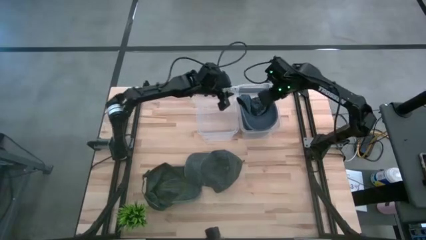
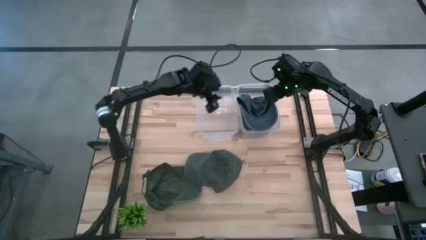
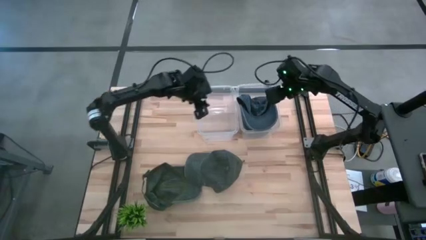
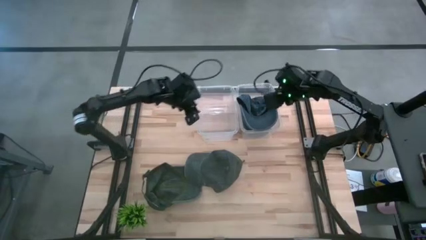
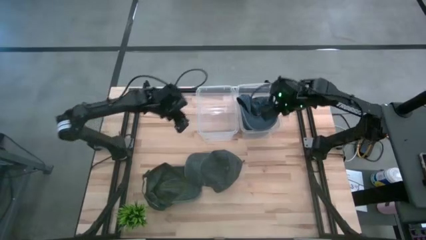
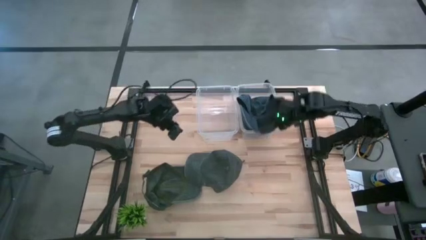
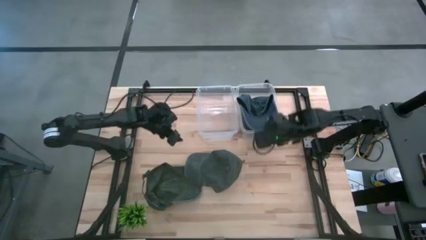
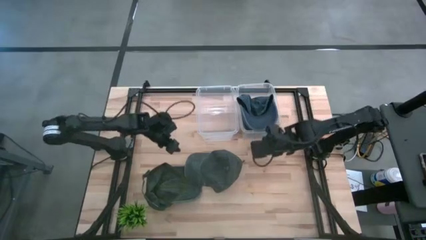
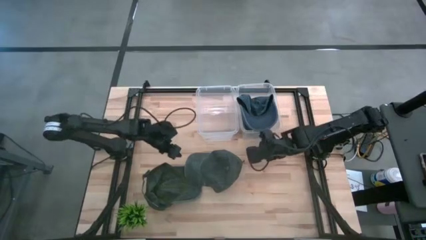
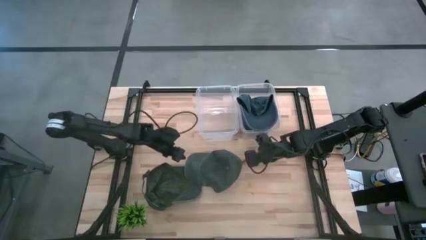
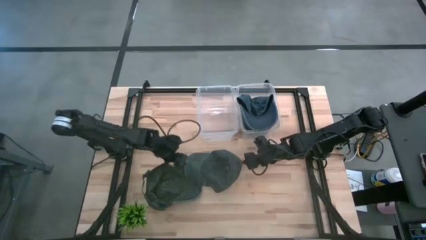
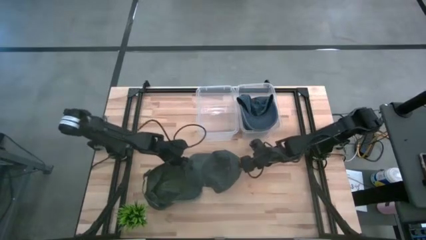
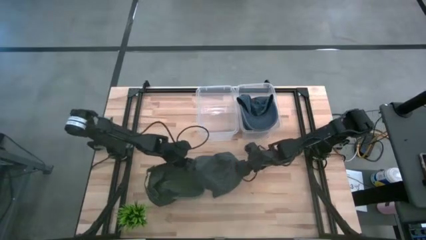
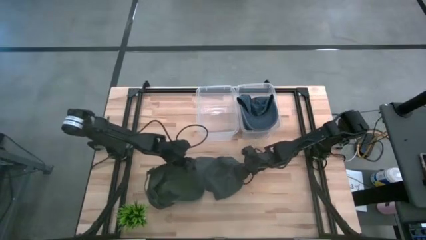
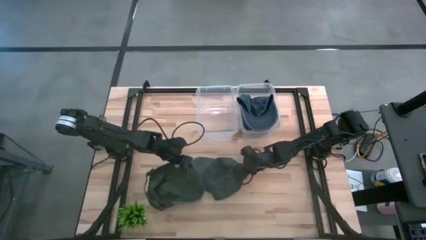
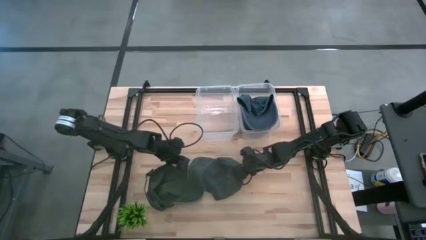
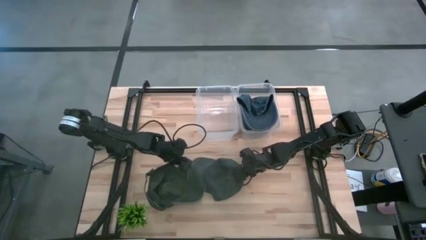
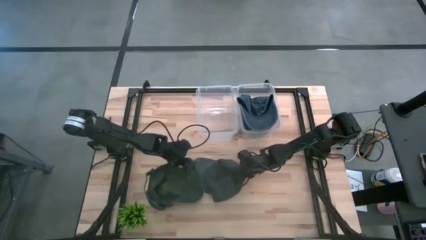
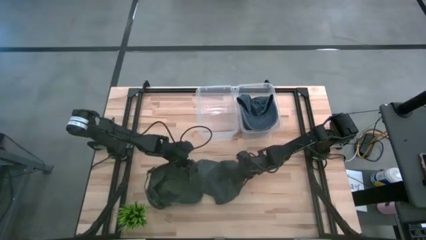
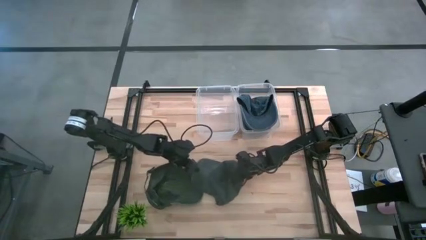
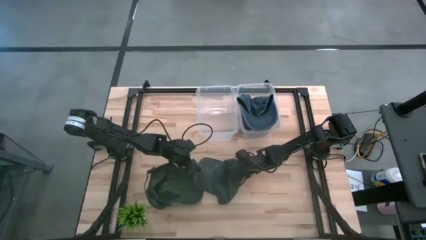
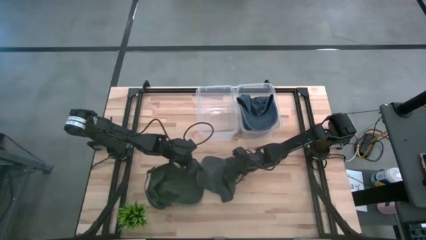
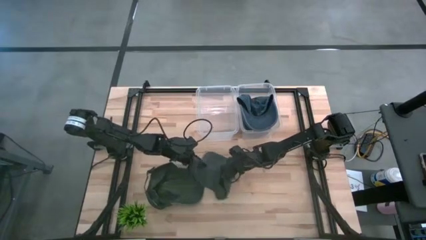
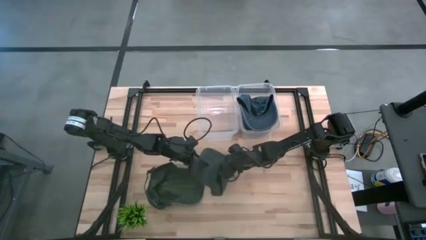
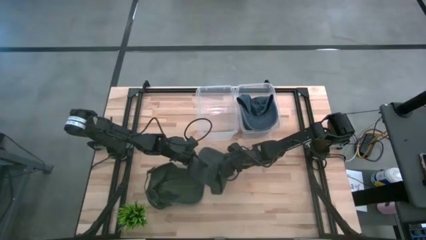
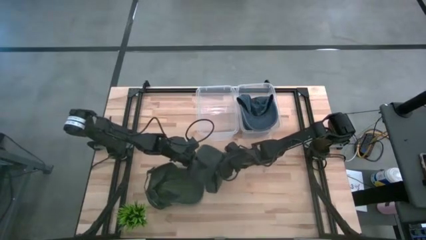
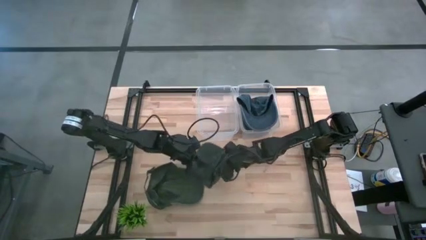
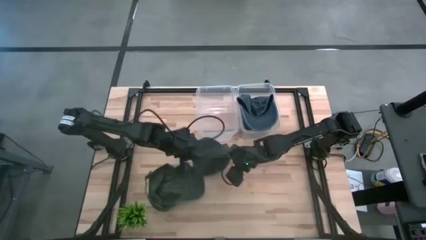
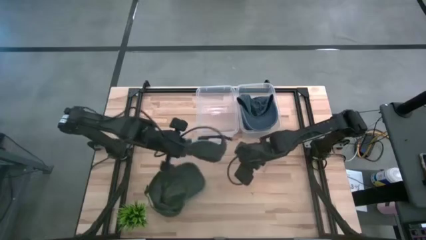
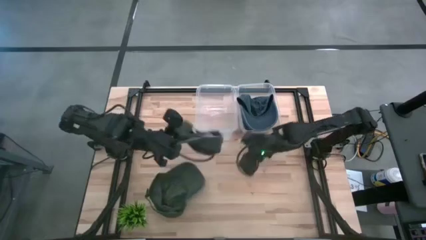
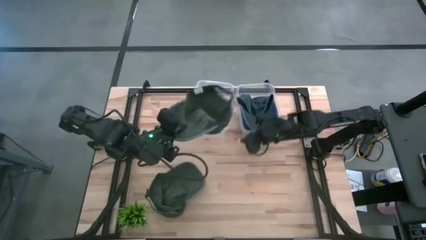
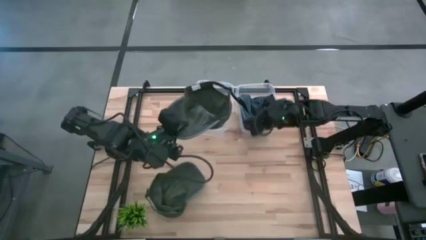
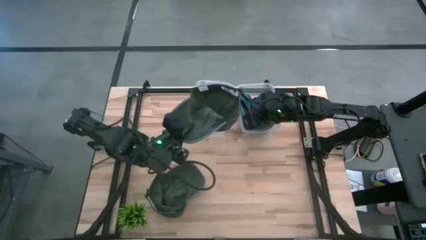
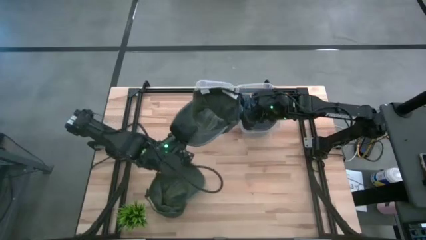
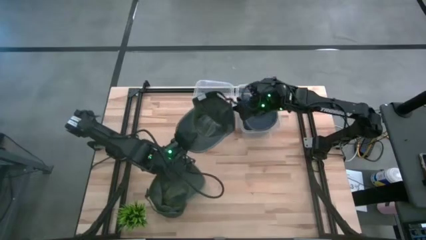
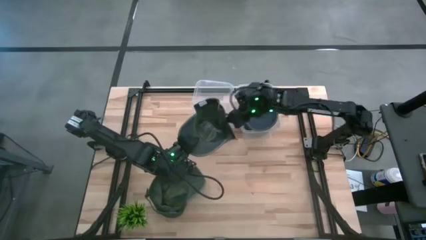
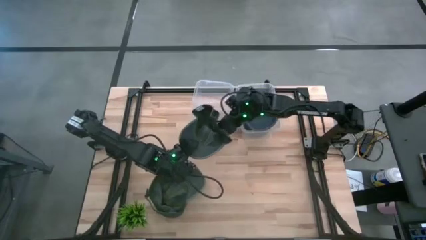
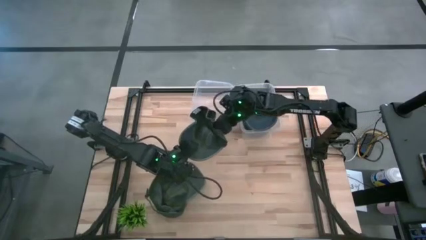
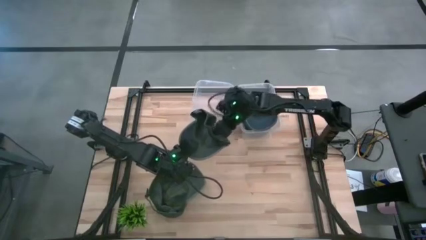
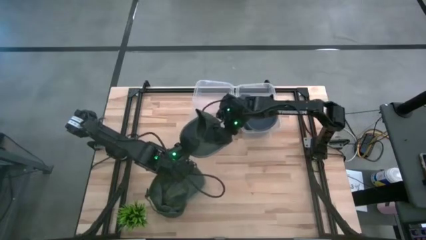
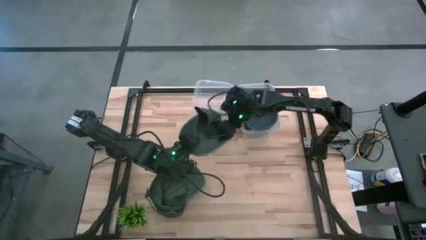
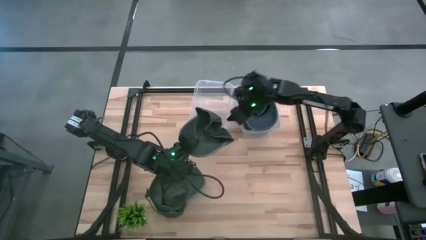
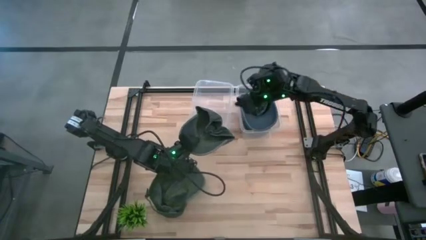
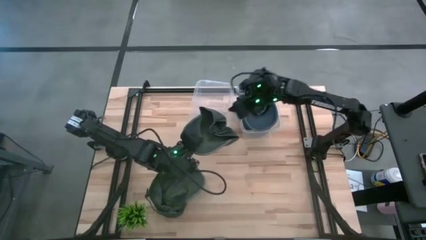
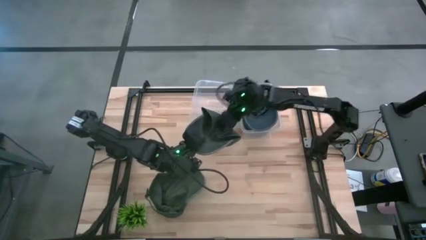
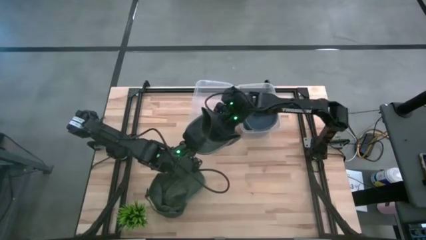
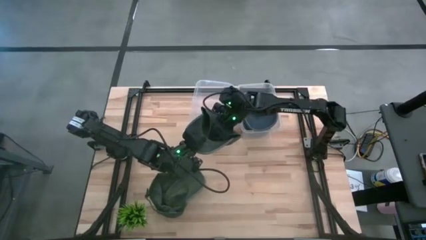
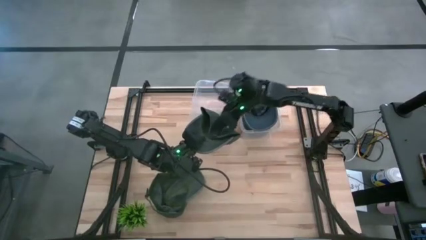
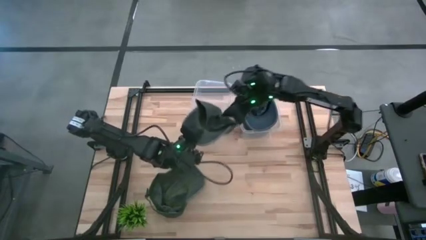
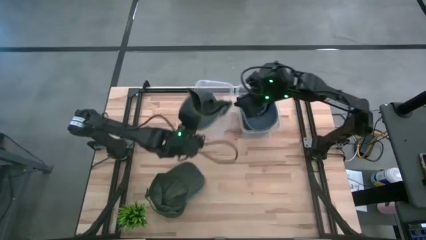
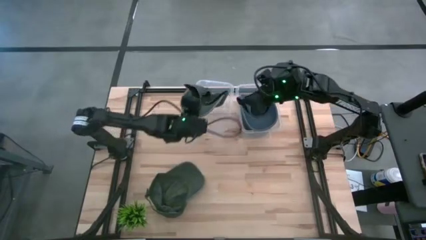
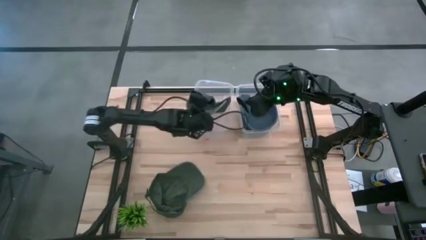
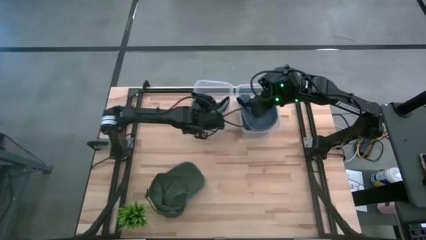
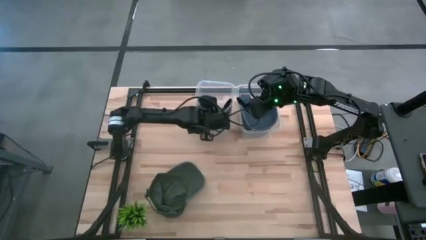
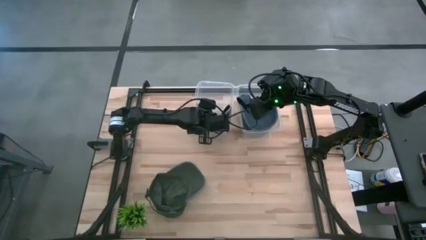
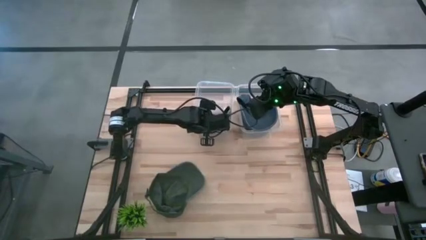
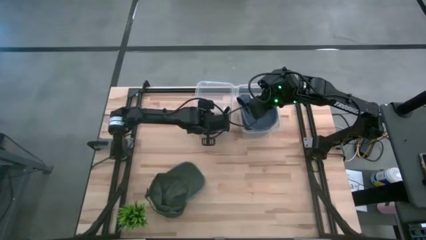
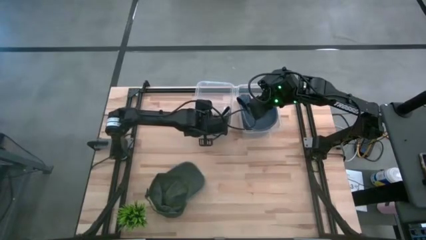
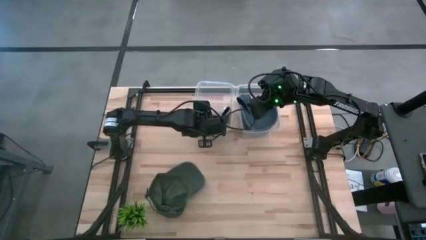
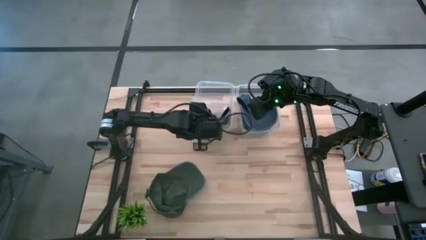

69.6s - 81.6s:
Task: Pick & Place hat
Put the right gray cap into the left transparent bin

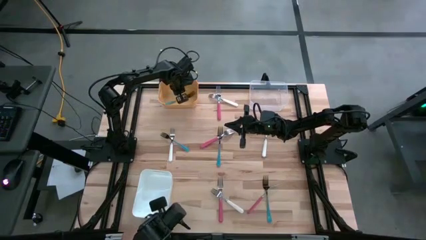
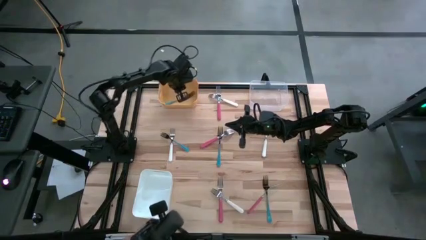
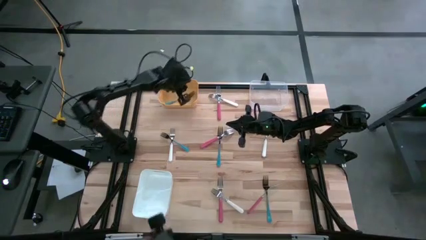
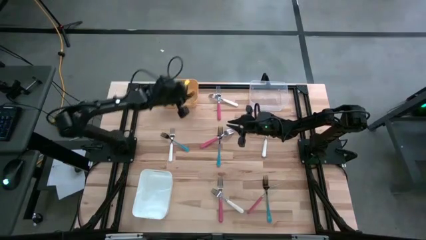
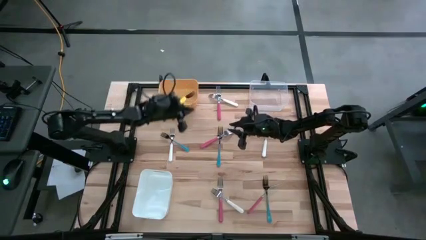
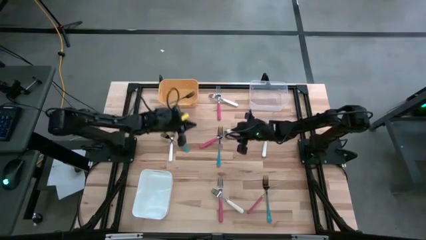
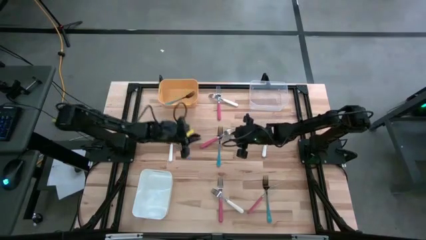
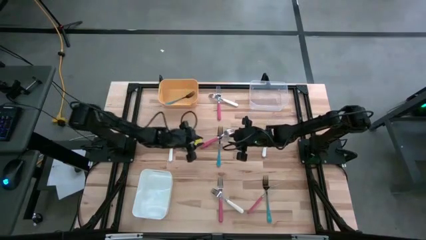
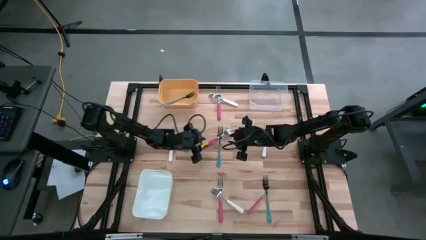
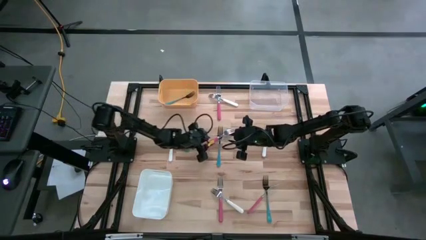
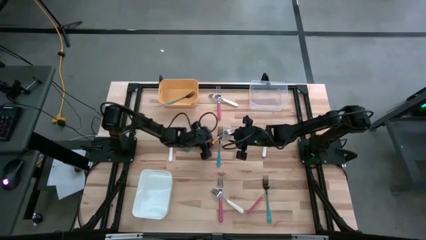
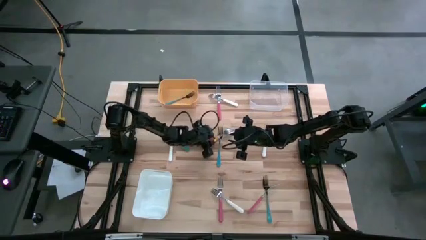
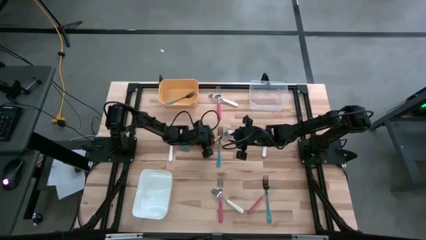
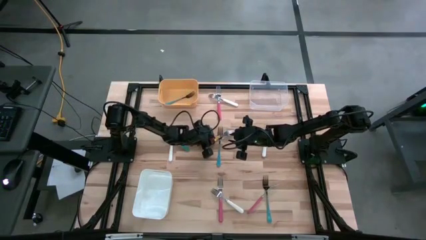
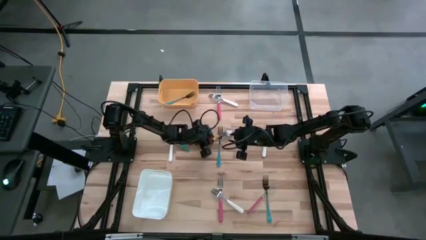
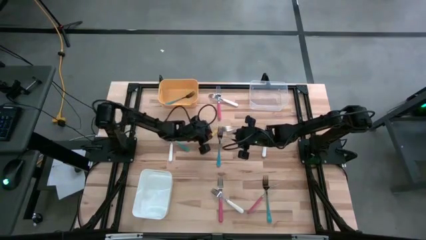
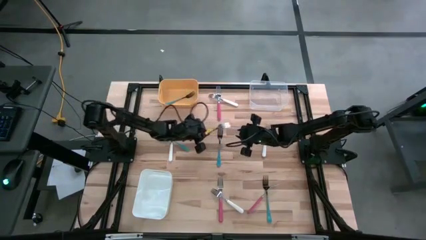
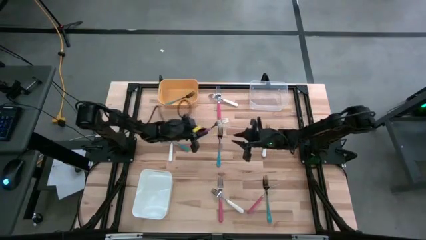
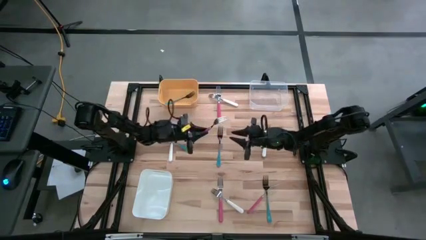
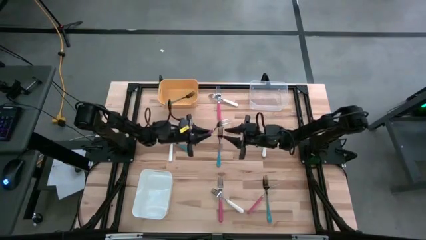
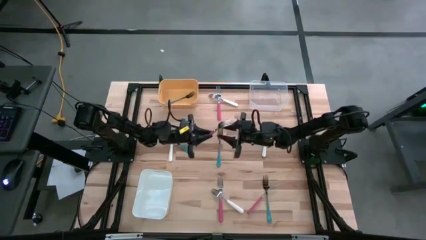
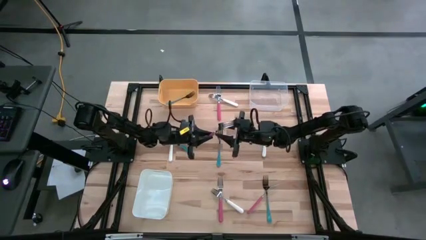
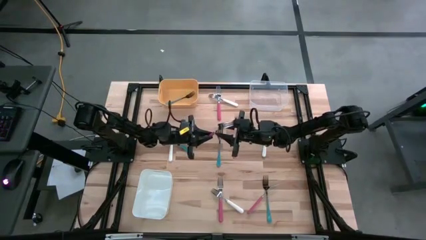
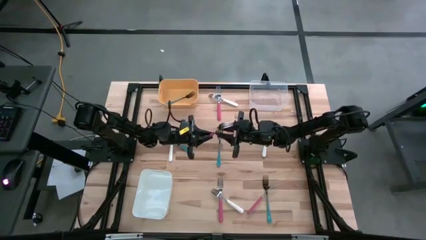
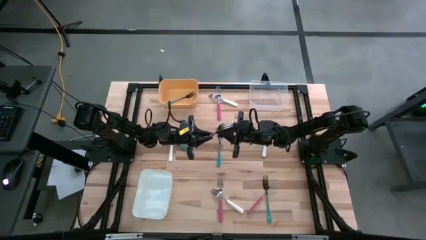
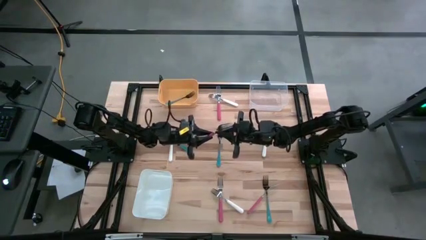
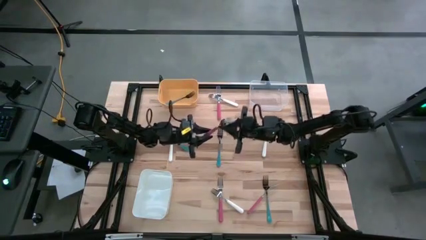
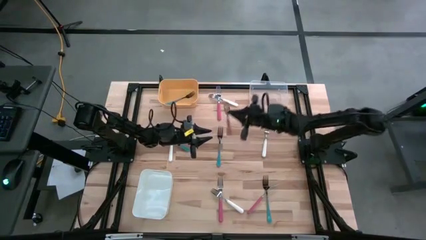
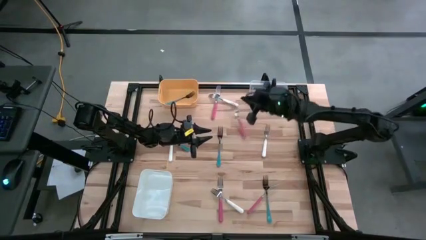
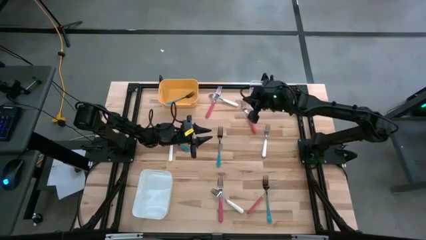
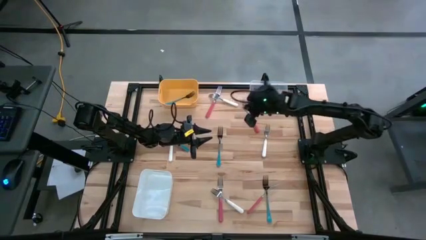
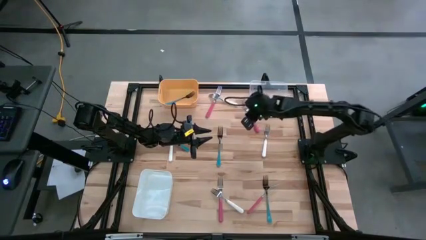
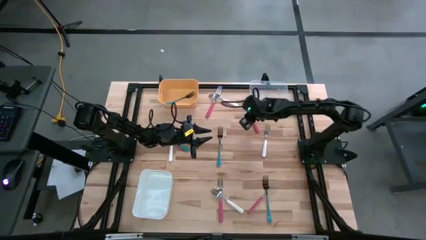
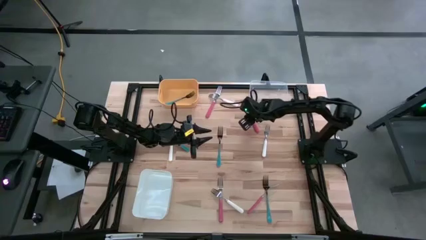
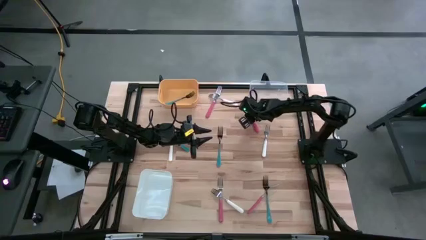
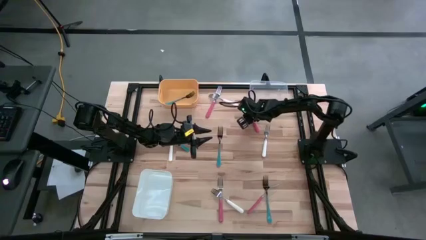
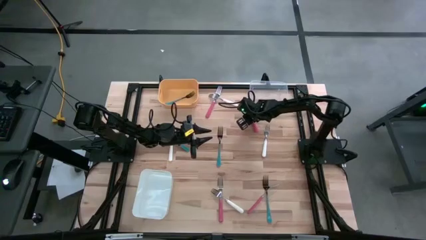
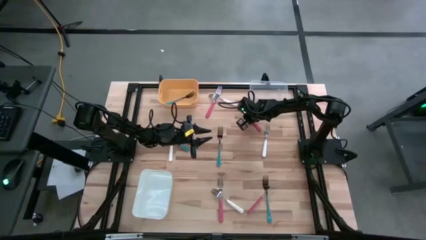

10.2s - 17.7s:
Task: Sort silverware by color (type)
Put the pink fork into the transparent bin
